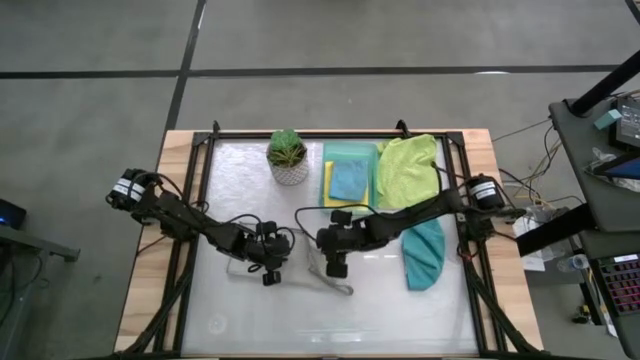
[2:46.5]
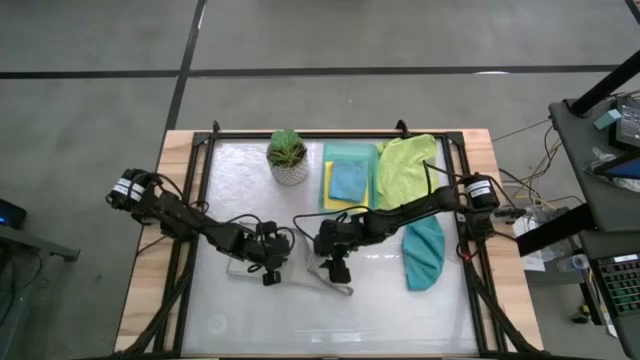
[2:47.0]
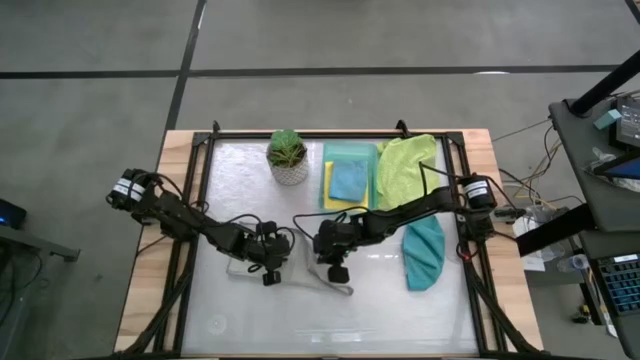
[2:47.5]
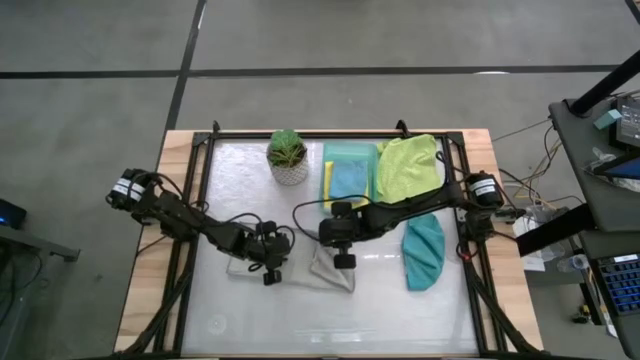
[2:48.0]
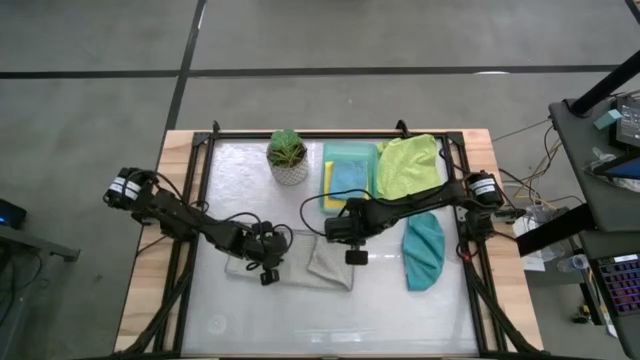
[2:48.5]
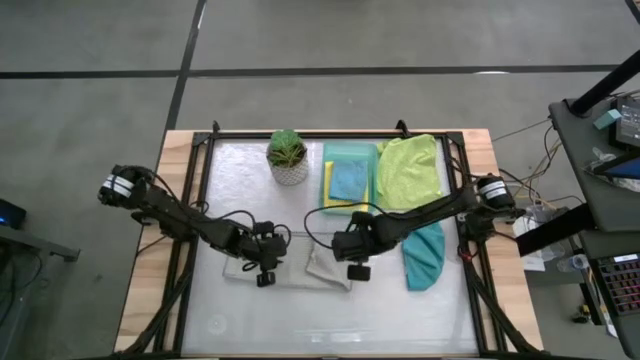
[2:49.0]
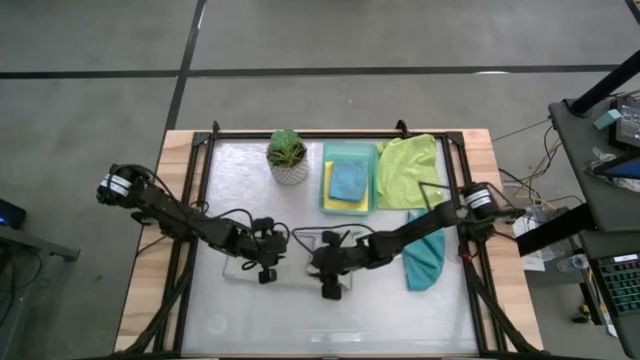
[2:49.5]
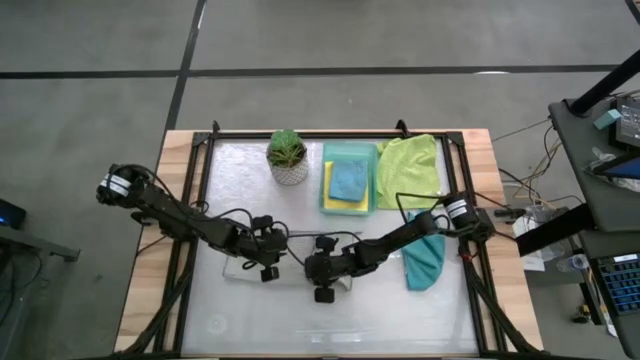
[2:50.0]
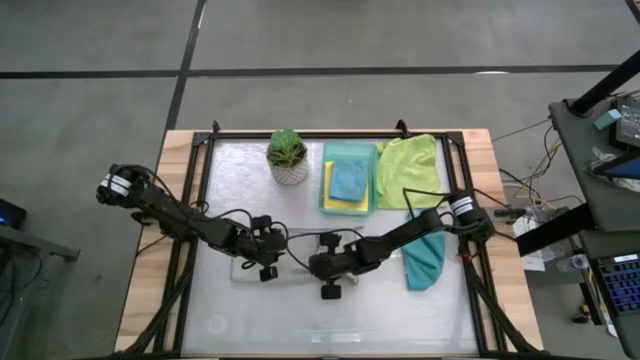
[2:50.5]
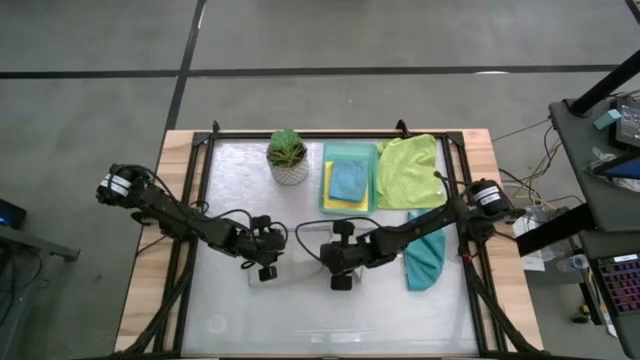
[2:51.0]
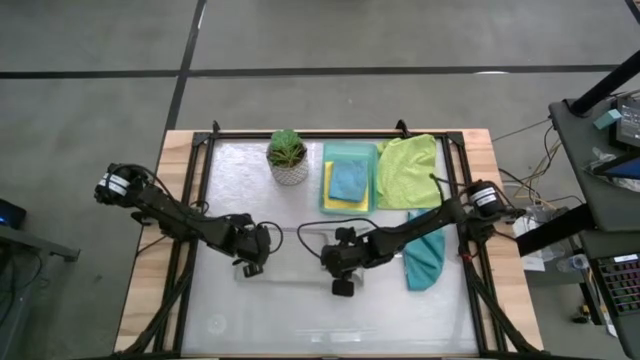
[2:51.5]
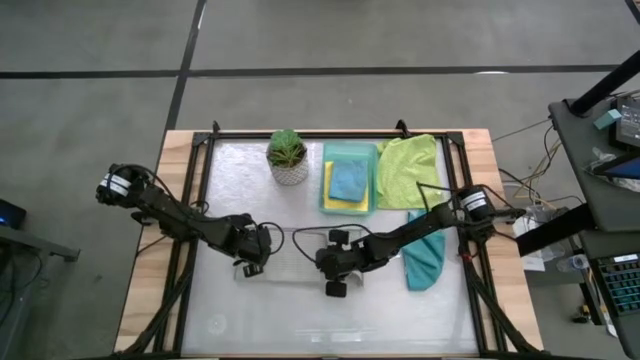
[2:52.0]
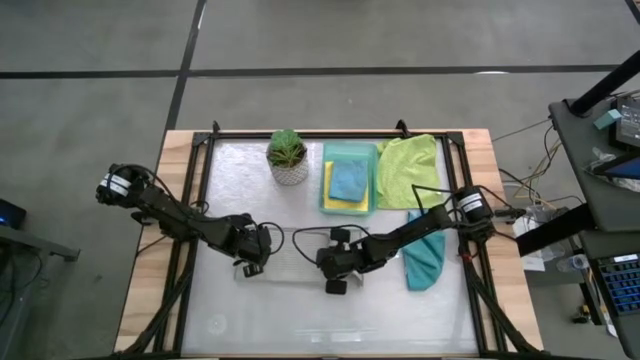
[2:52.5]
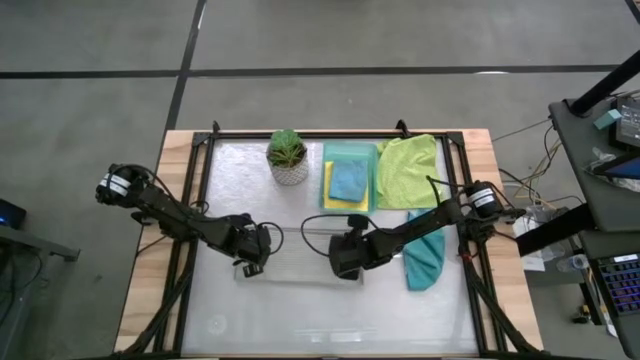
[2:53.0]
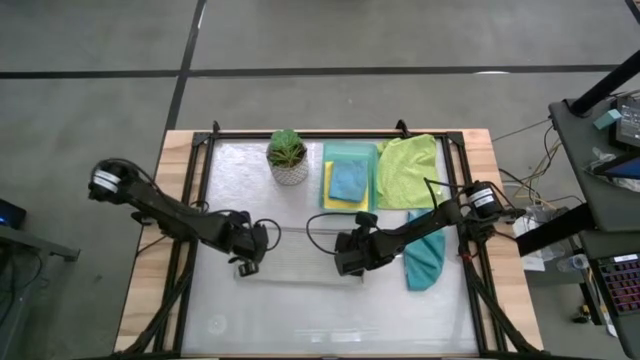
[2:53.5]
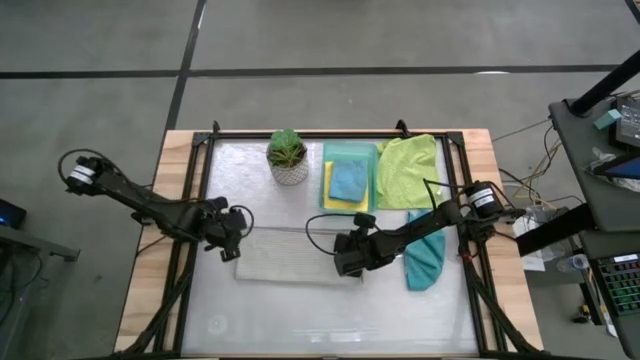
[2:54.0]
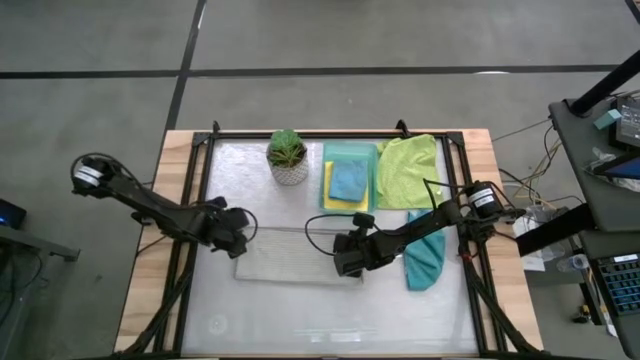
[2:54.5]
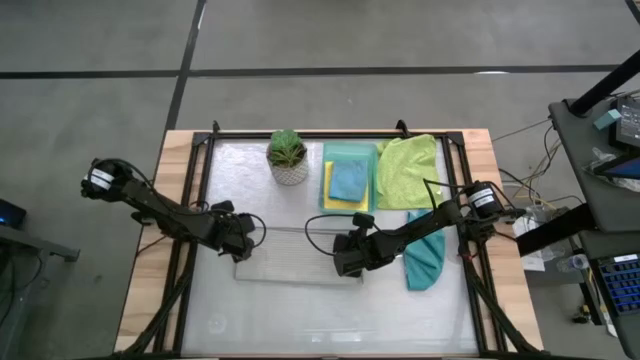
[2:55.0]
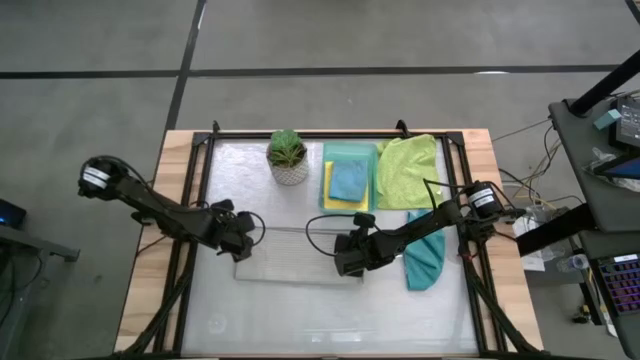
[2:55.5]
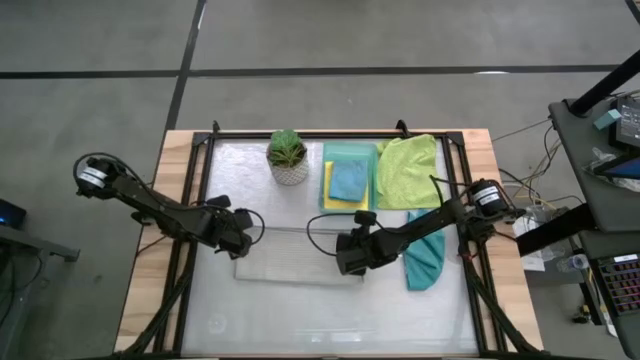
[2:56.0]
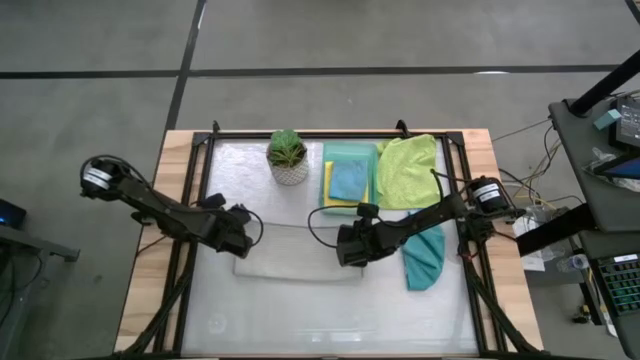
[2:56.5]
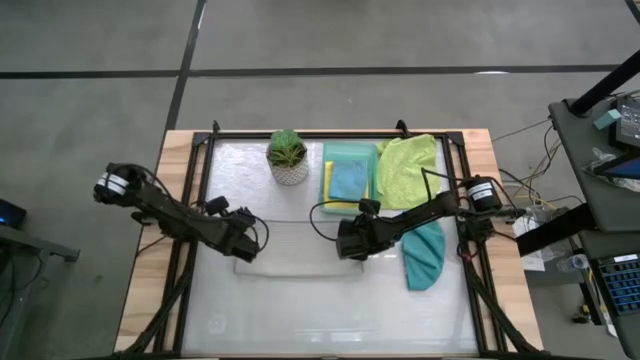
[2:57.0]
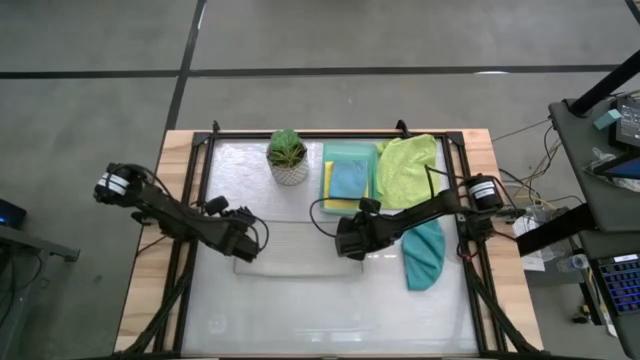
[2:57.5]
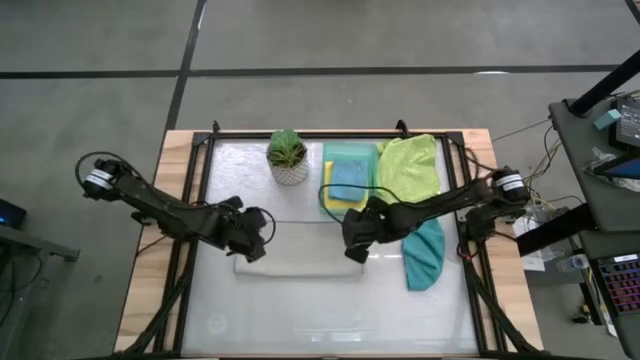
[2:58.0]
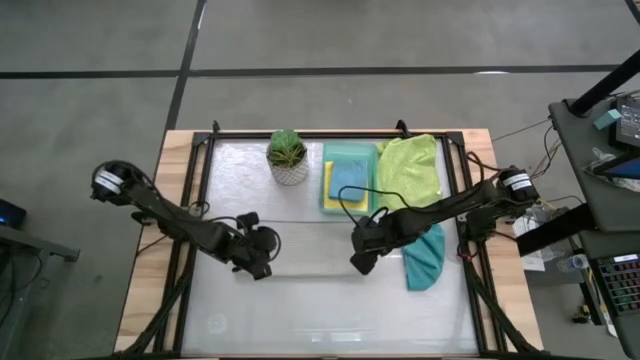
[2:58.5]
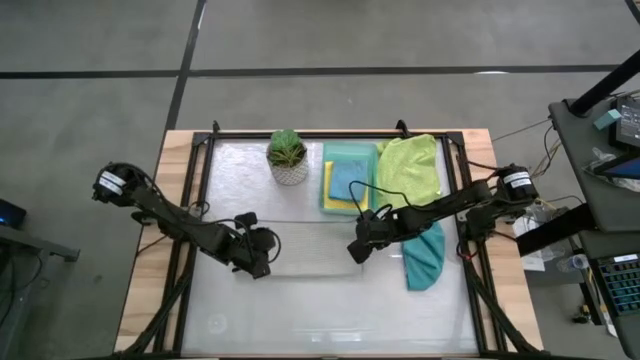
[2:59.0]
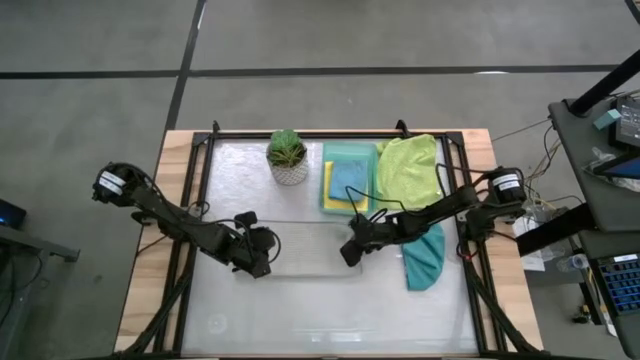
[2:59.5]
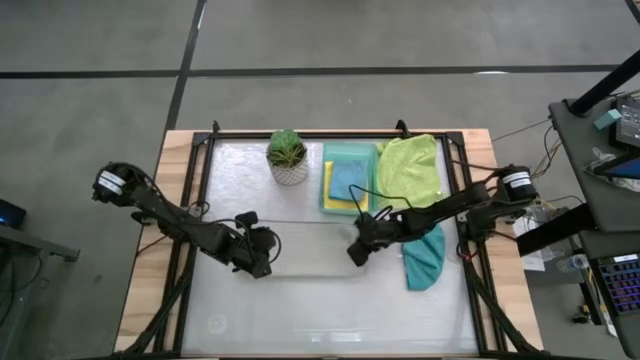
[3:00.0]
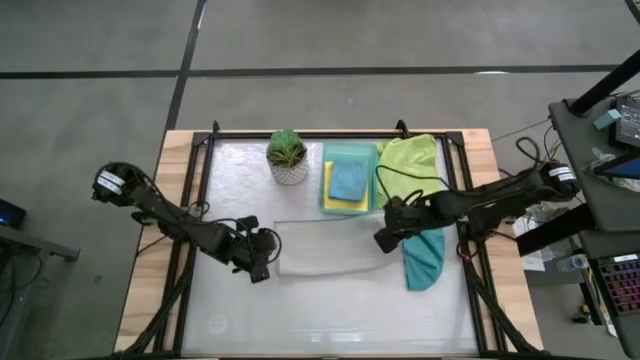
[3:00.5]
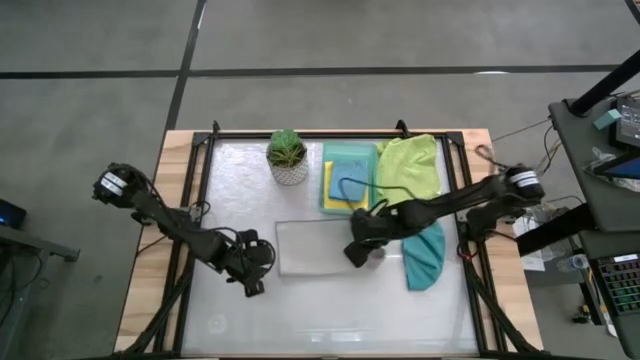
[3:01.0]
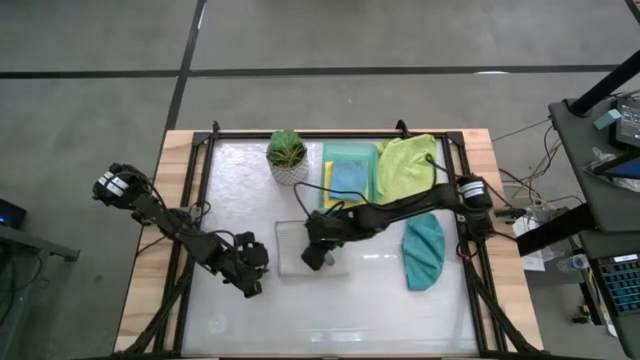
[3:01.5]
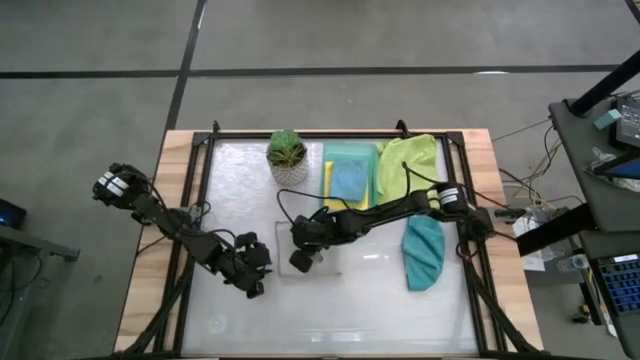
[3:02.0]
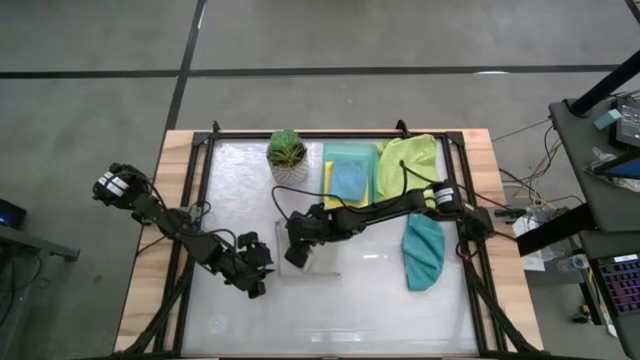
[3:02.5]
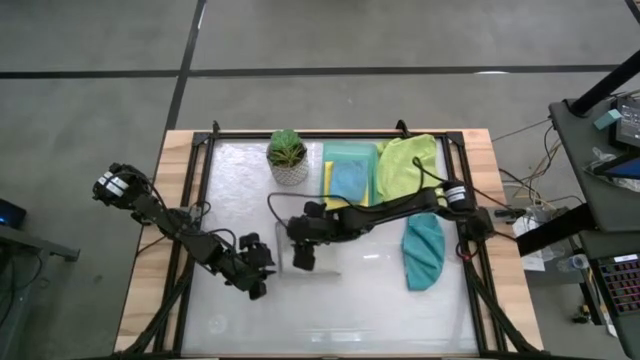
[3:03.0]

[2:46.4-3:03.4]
Task: Fold microfiber towels
Fold the gray microfiber cloth

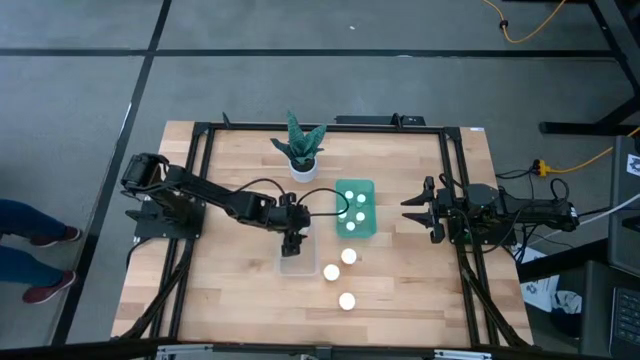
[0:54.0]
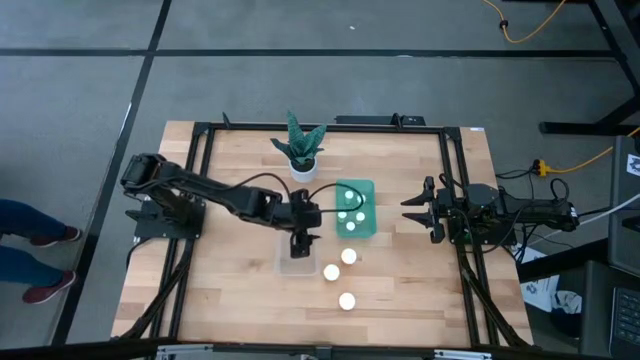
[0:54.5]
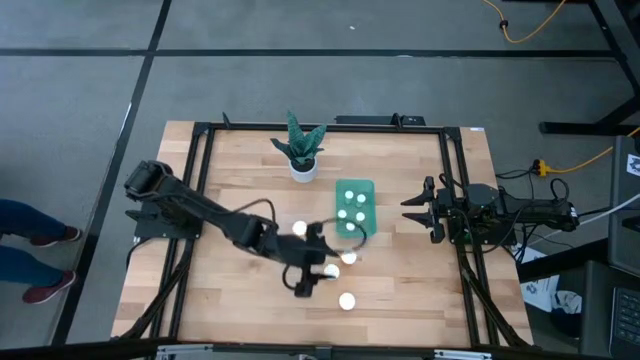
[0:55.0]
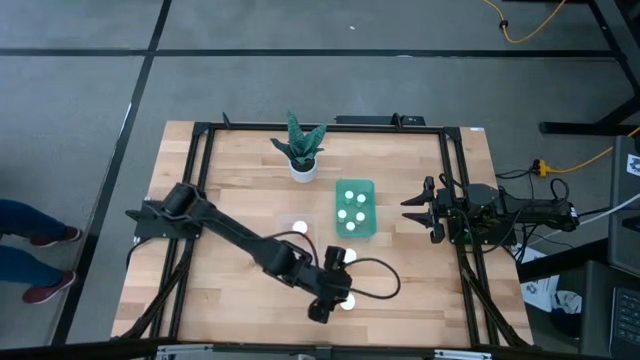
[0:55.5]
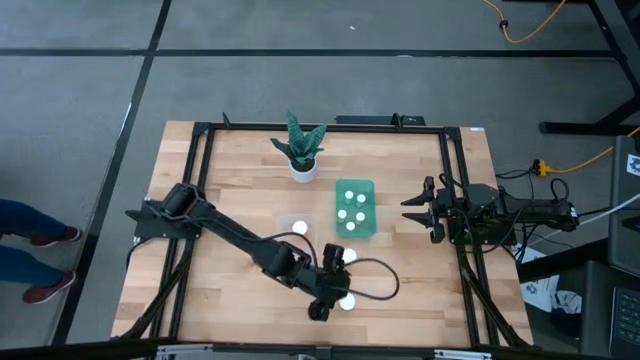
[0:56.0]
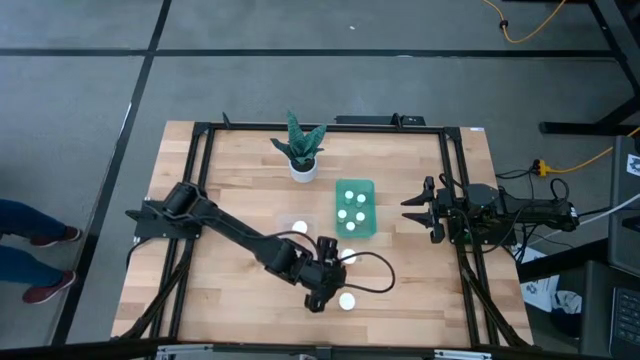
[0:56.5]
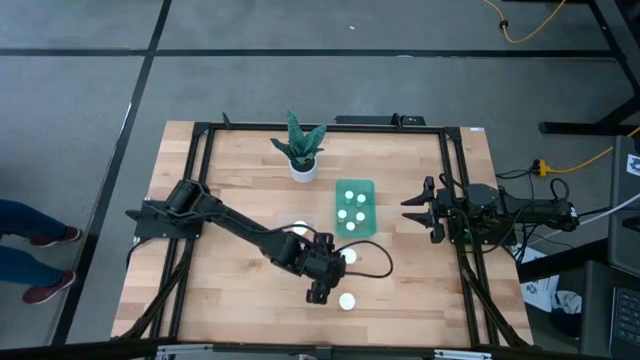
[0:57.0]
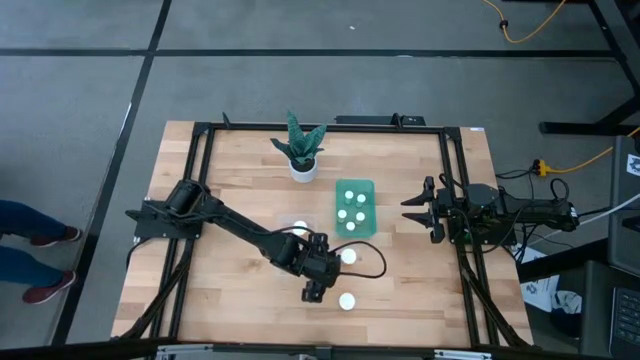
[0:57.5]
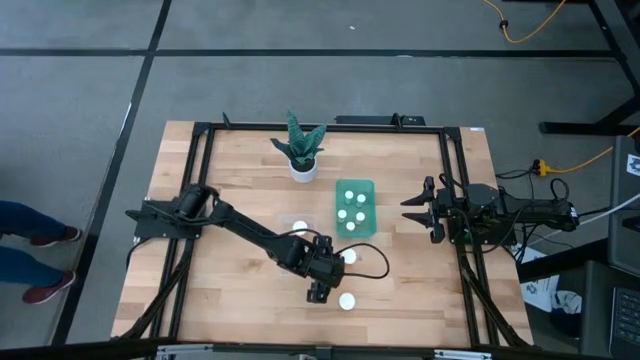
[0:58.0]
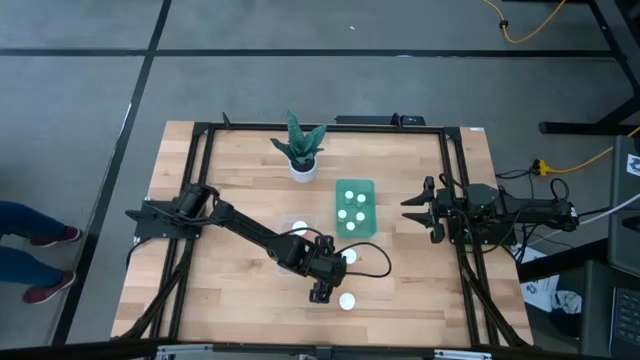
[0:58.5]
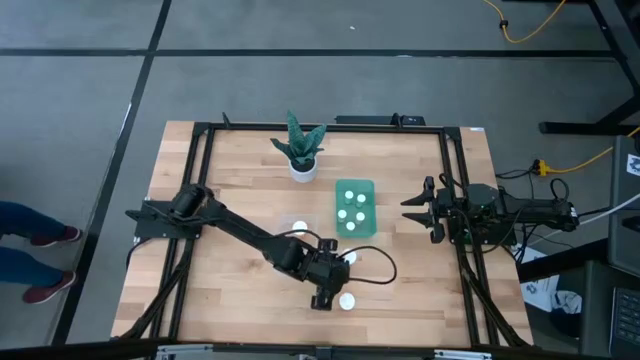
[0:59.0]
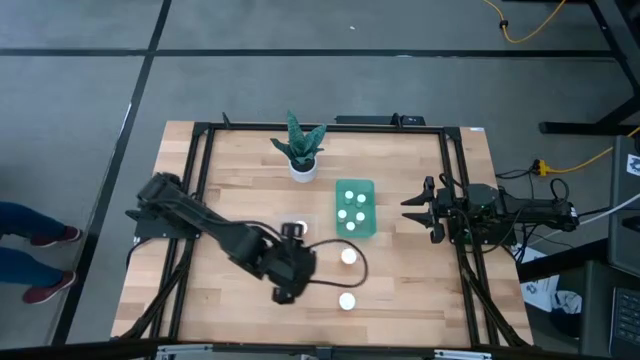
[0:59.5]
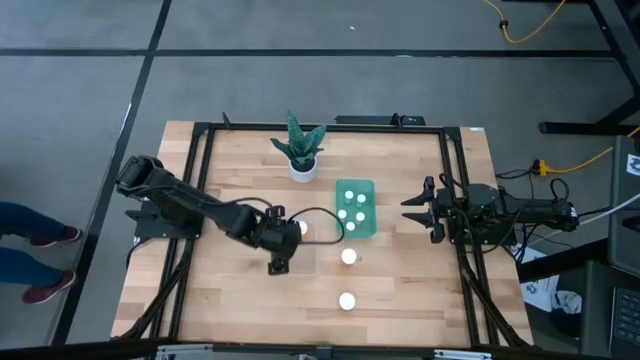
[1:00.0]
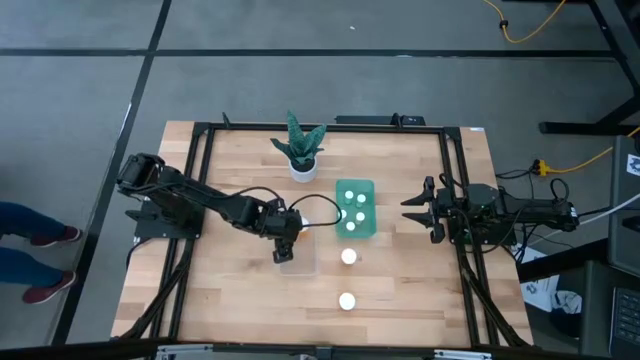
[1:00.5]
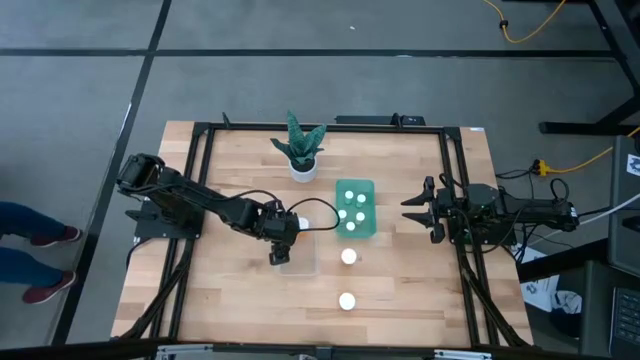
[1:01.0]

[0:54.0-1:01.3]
Task: Pick and place medicine bottles into bin by pill shape (circle, oval)
Put the large orange pill bottle into the transparent bin
